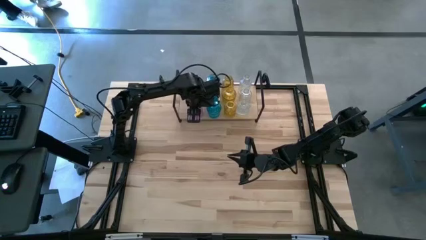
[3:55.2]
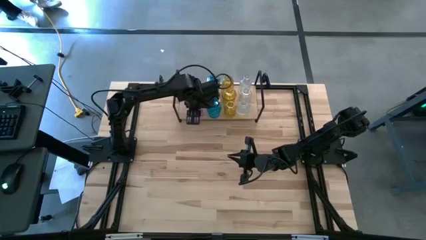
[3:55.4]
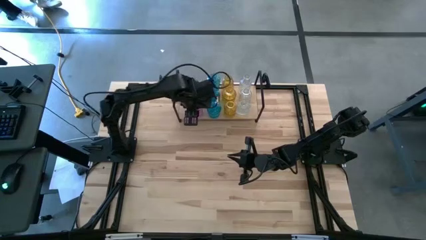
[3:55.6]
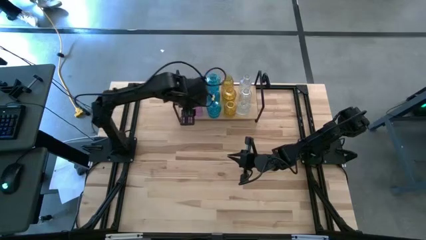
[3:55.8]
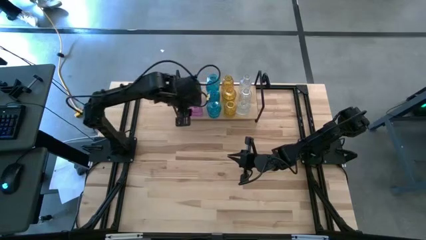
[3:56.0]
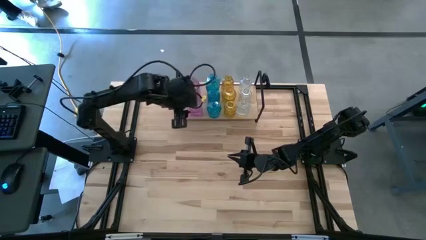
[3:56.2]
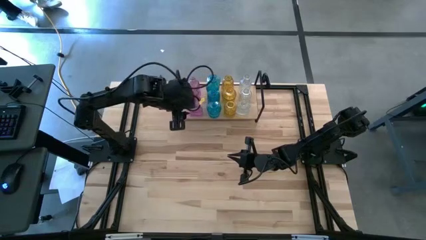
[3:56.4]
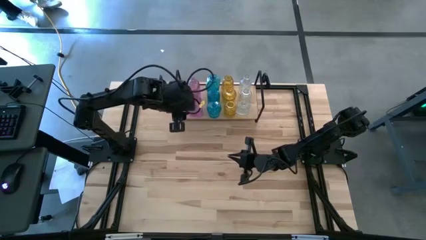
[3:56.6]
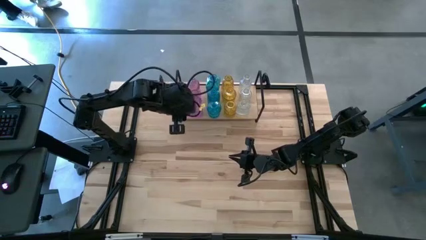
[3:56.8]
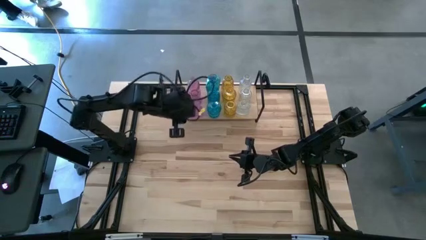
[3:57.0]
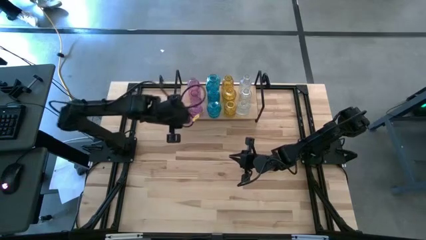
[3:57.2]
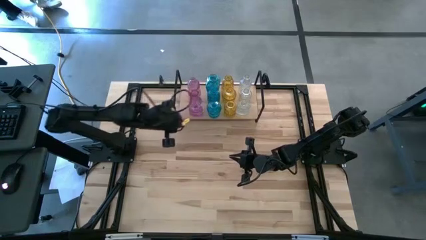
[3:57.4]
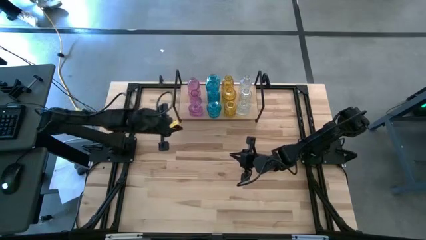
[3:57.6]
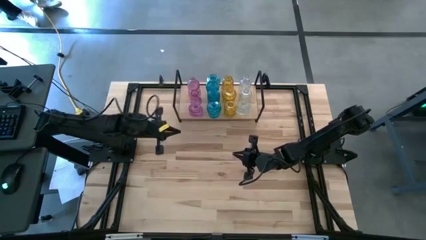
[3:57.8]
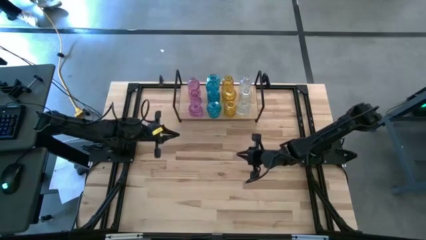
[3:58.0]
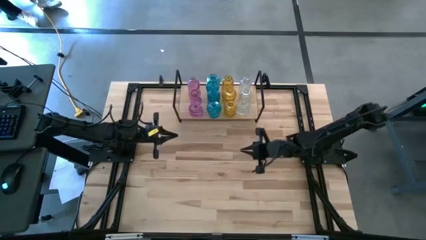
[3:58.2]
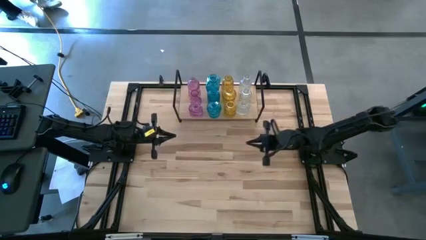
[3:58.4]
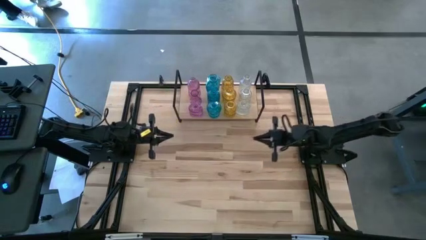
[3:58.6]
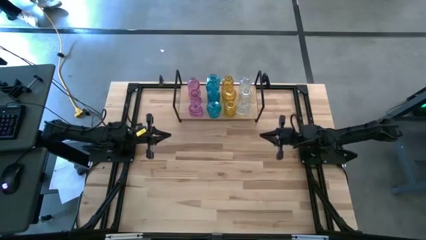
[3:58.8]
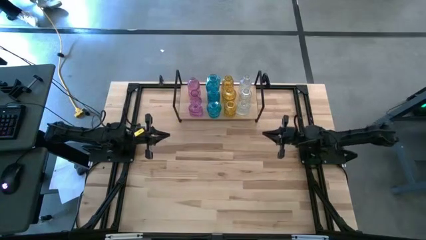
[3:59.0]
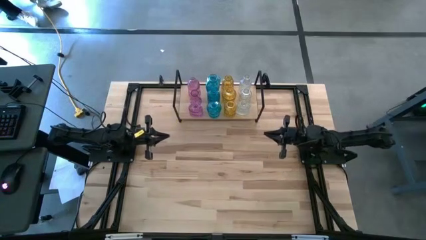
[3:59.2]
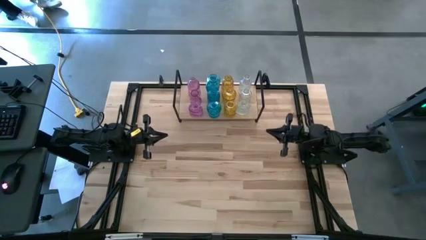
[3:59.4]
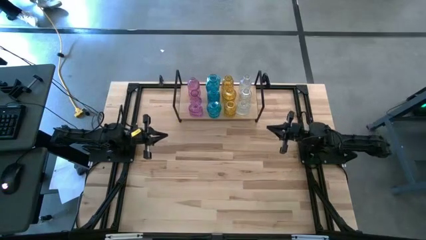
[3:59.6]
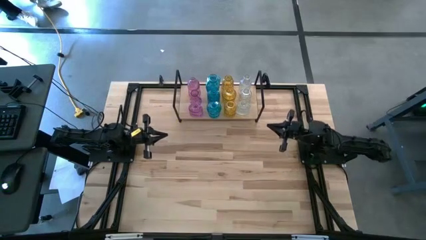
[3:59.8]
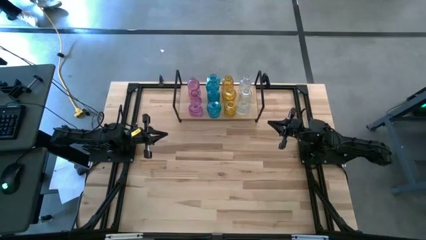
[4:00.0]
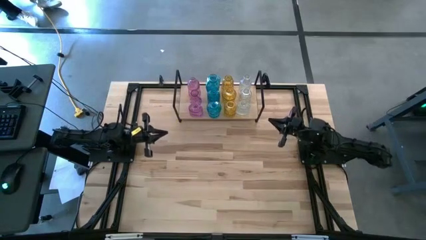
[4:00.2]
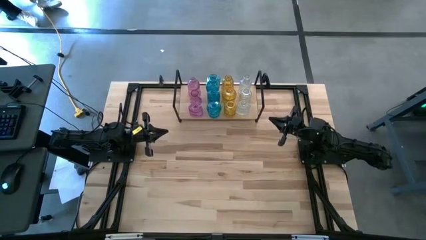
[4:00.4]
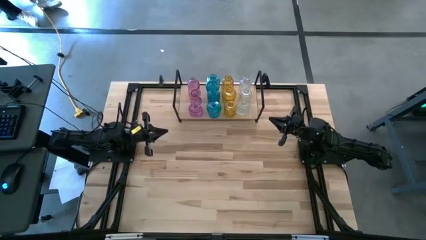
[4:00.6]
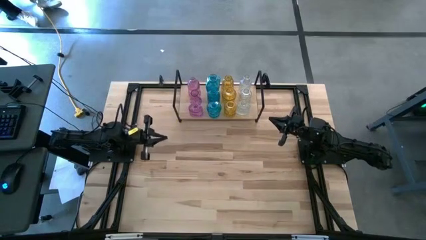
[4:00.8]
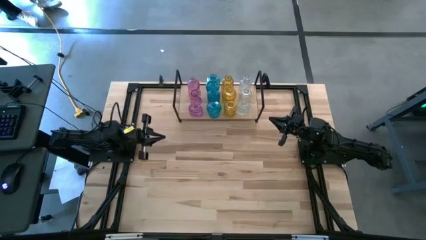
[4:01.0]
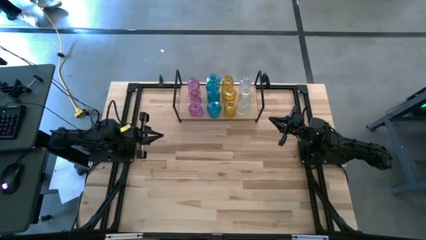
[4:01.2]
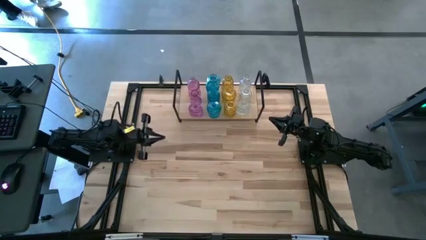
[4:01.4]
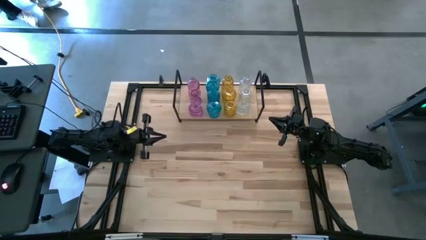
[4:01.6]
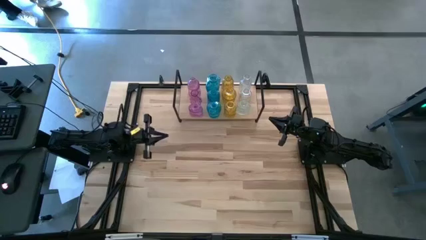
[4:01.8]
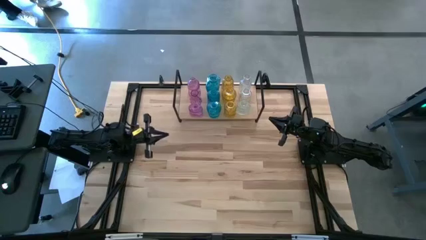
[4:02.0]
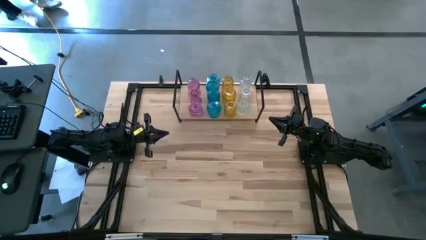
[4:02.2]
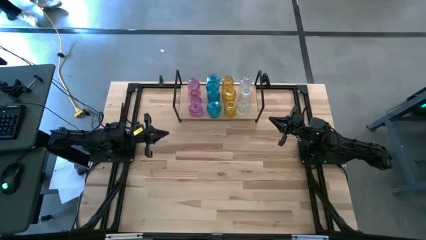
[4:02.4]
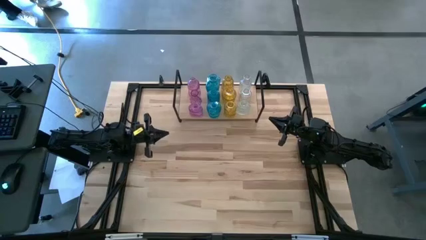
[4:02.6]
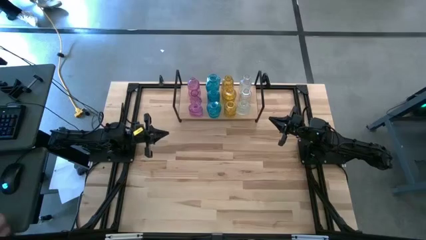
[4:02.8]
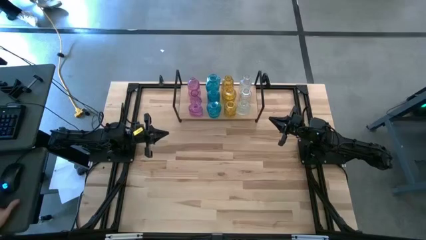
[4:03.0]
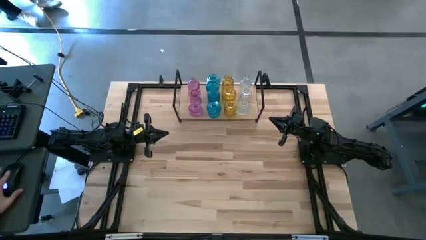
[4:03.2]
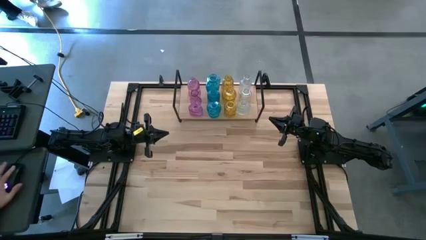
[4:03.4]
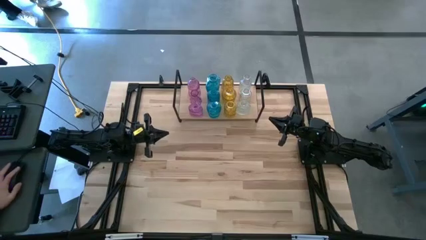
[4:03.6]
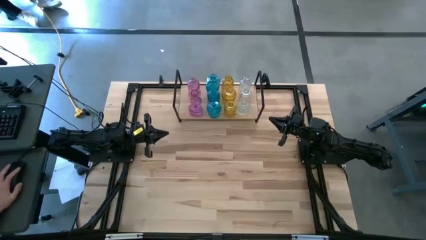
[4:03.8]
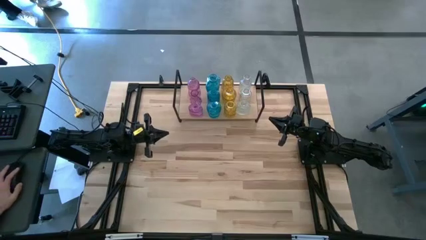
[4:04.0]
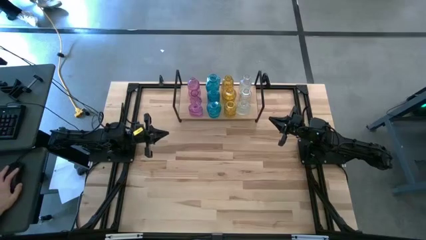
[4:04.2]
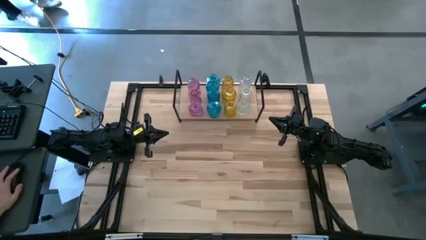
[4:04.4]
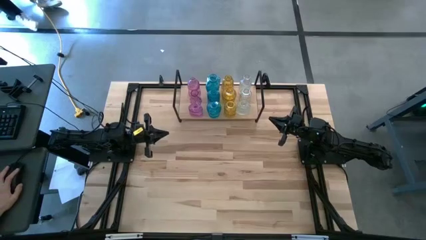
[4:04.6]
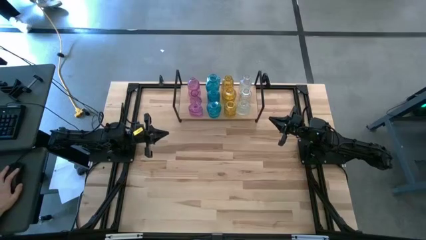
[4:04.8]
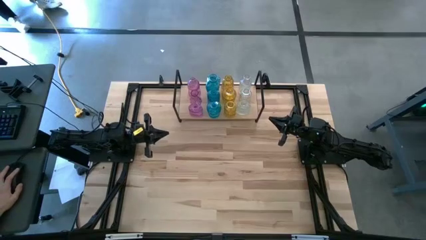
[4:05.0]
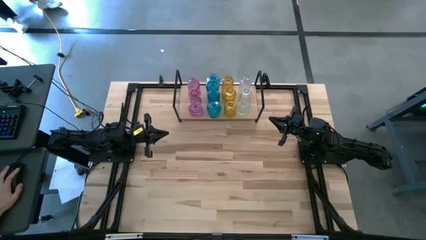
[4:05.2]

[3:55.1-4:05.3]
Task: sort vases onto shelf
Return to Home Position

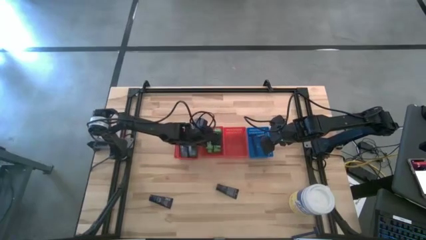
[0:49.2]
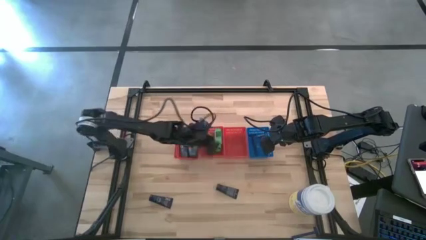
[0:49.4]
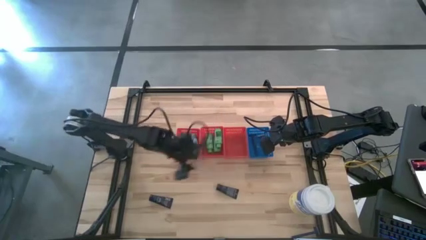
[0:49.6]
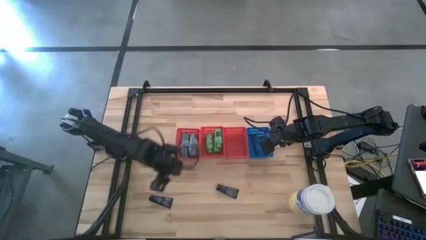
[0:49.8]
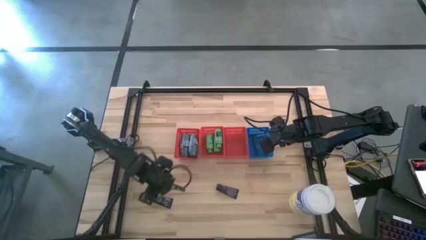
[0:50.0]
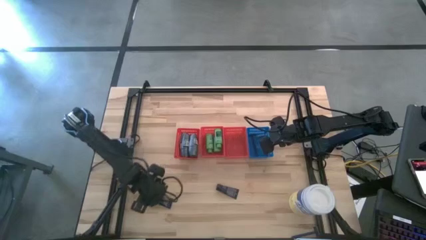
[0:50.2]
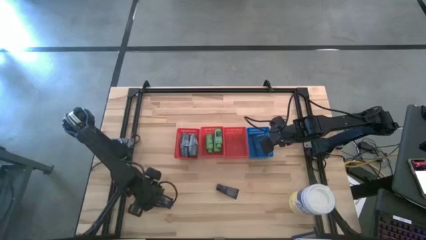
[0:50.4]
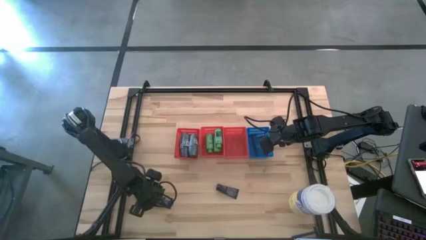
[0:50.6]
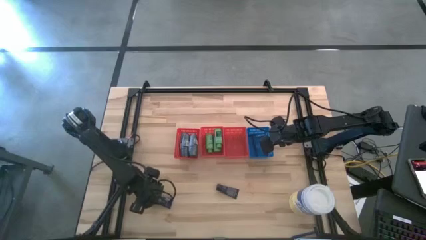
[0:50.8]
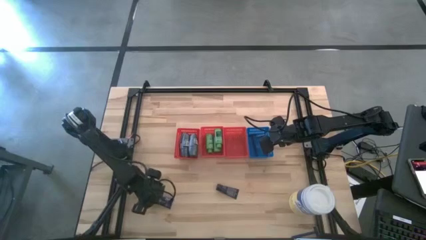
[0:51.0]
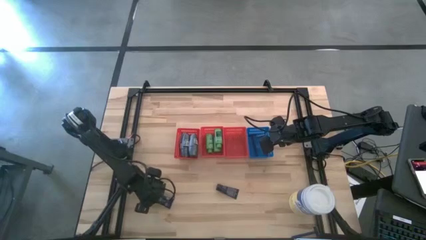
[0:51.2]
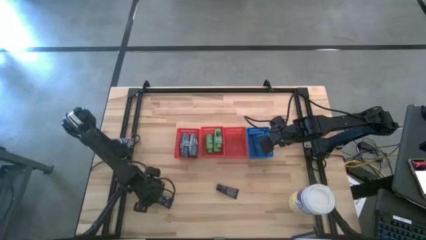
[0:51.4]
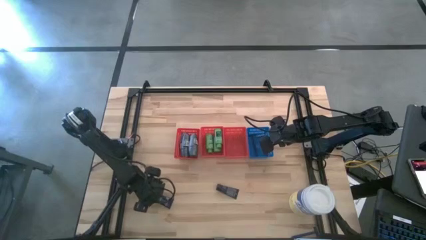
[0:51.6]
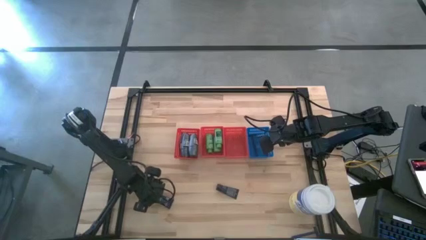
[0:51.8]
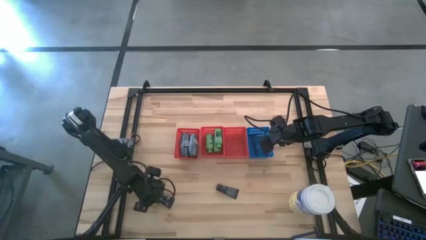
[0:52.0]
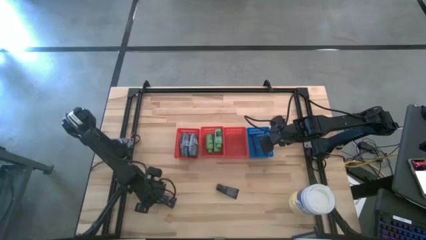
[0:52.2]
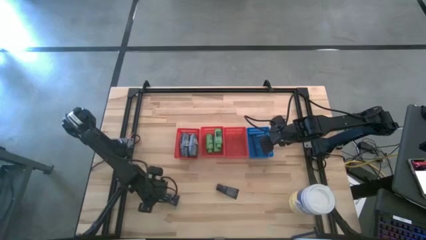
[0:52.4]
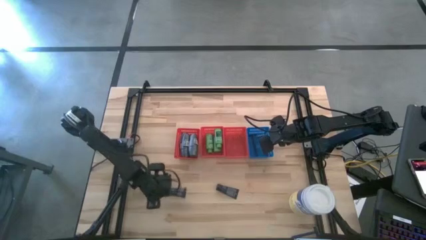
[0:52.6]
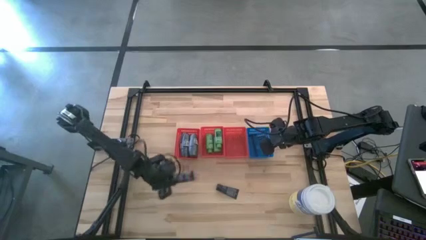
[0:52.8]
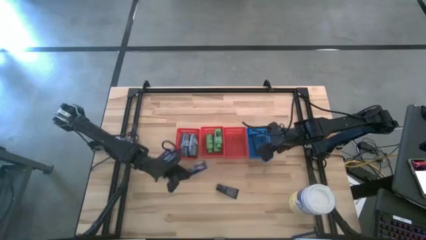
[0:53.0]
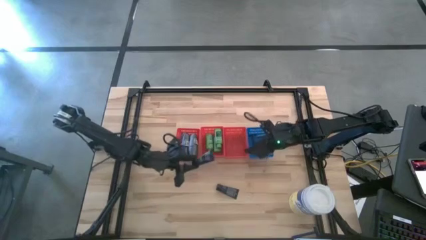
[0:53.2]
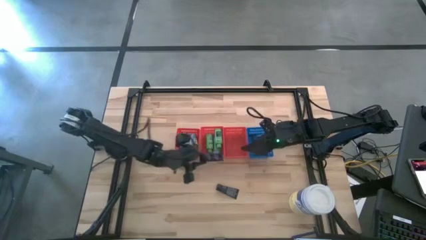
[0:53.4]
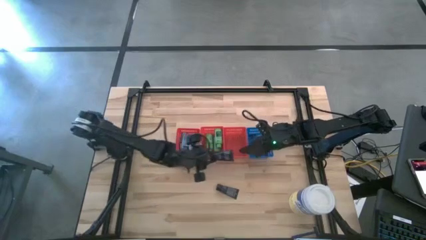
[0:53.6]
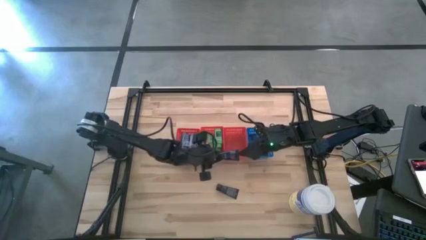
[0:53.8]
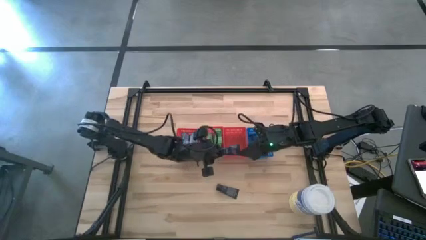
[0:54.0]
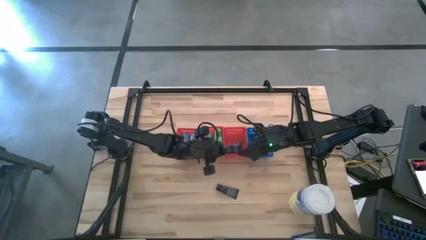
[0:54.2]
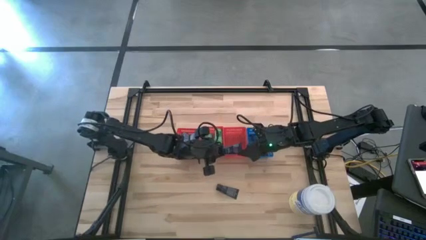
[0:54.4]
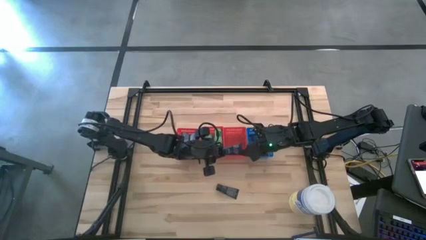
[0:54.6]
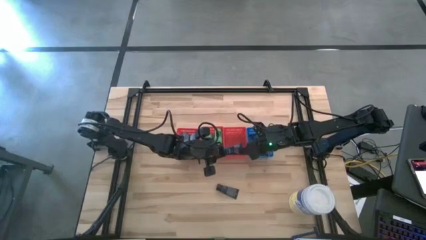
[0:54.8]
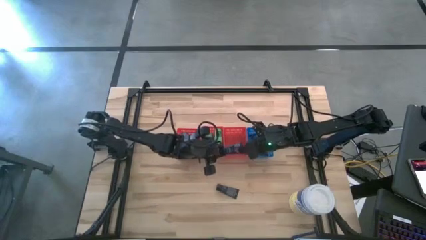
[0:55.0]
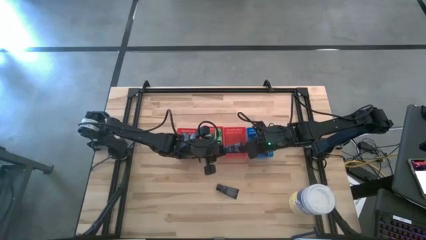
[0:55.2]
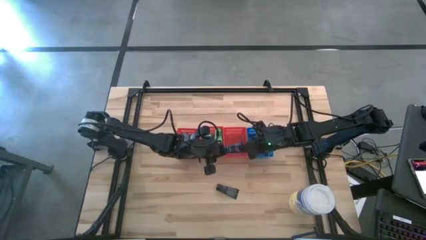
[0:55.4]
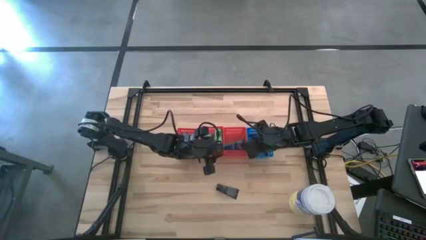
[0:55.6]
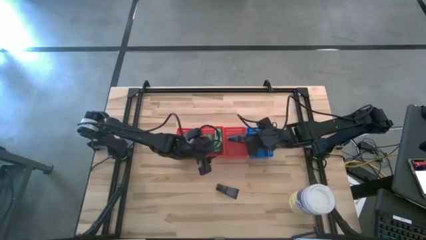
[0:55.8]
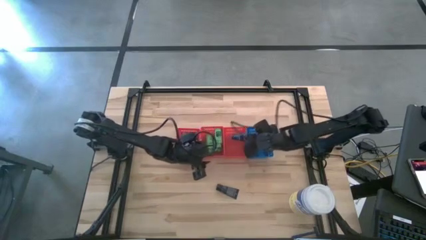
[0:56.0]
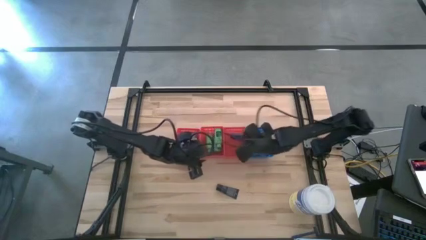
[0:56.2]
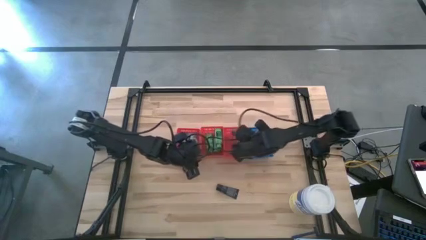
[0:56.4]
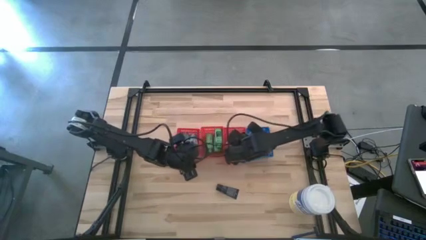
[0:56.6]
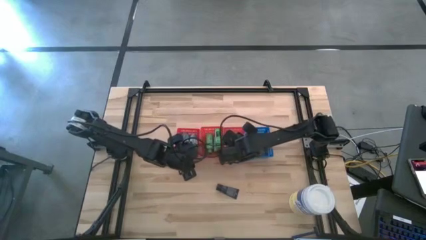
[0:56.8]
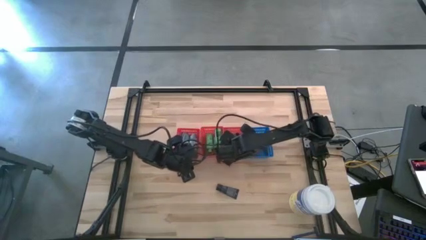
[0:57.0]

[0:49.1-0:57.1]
Task: Pick & Place Travel size toiletries
Put the blue shave cream into the right red bin
